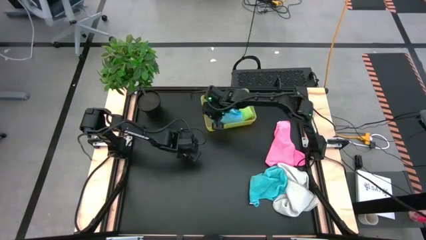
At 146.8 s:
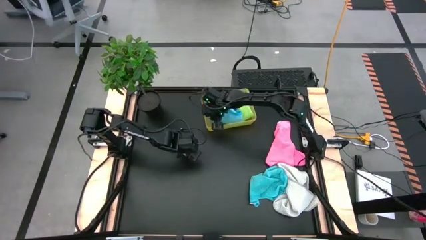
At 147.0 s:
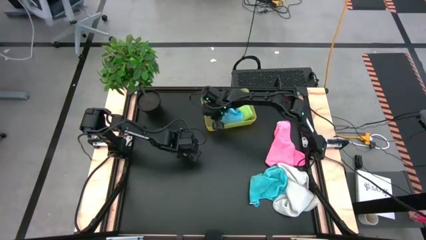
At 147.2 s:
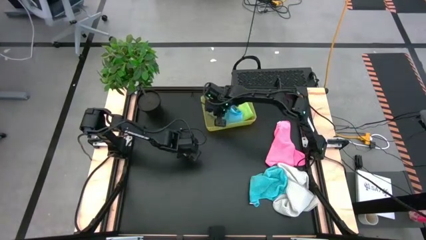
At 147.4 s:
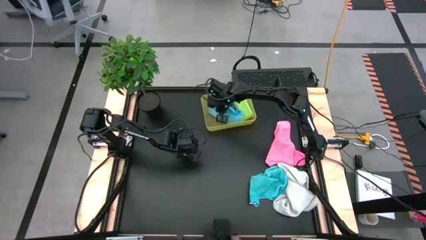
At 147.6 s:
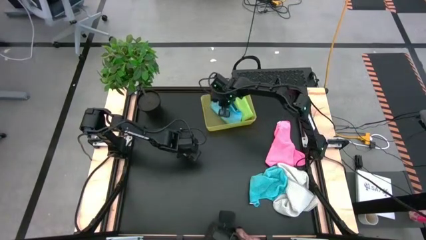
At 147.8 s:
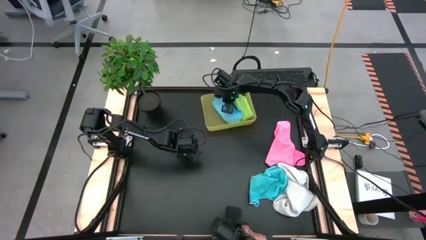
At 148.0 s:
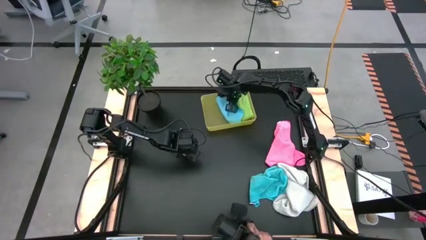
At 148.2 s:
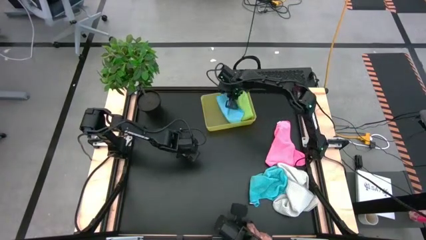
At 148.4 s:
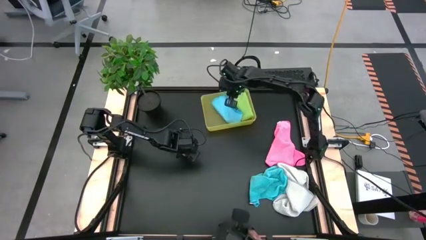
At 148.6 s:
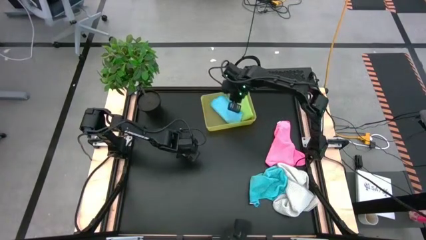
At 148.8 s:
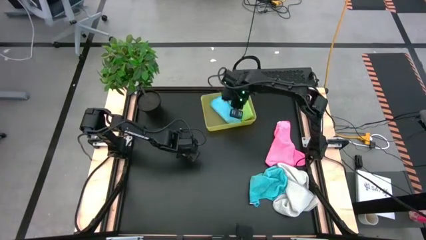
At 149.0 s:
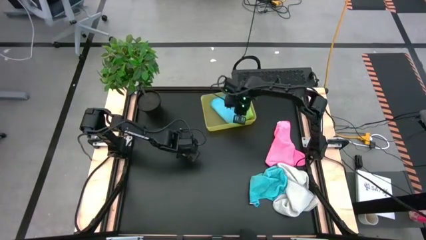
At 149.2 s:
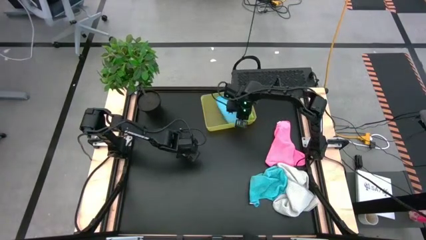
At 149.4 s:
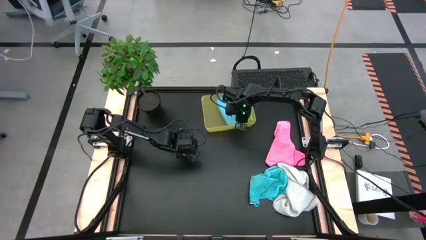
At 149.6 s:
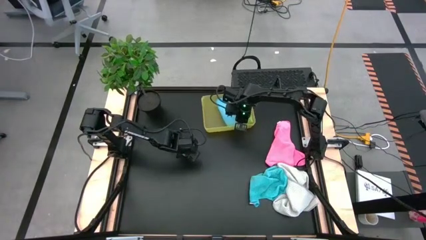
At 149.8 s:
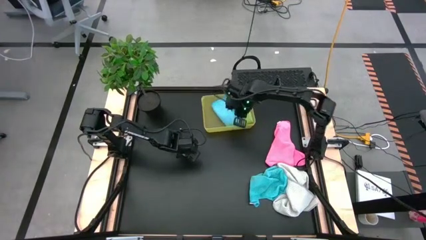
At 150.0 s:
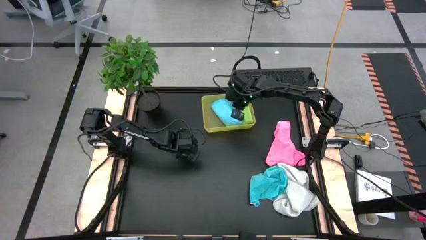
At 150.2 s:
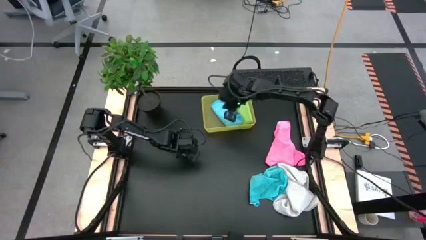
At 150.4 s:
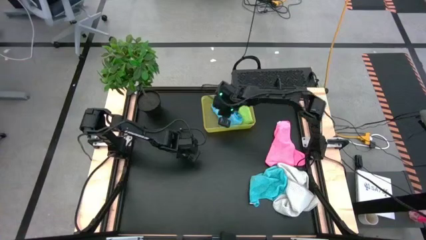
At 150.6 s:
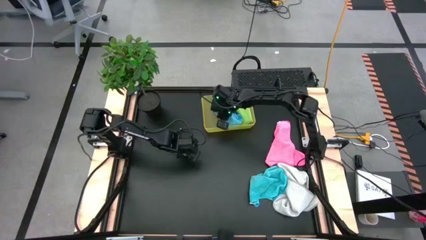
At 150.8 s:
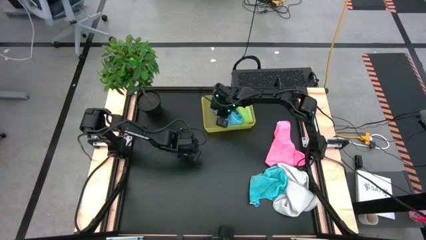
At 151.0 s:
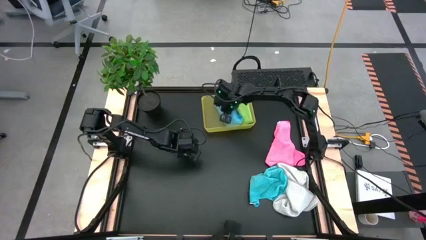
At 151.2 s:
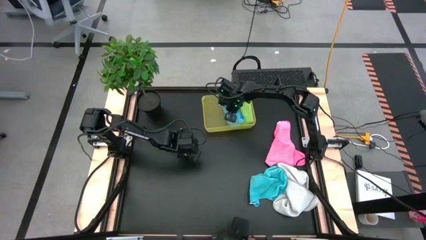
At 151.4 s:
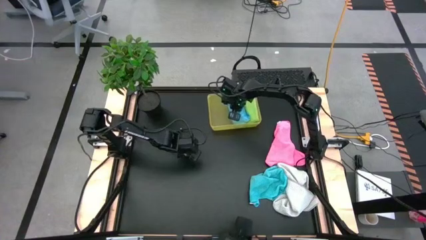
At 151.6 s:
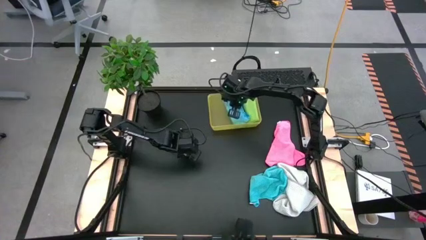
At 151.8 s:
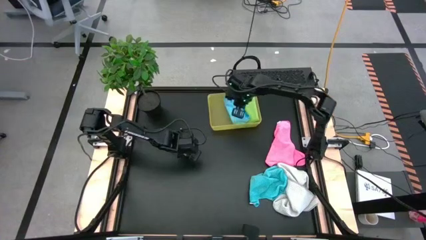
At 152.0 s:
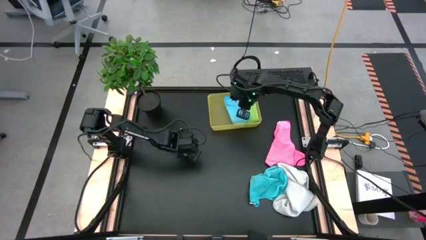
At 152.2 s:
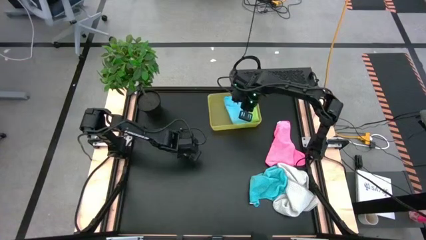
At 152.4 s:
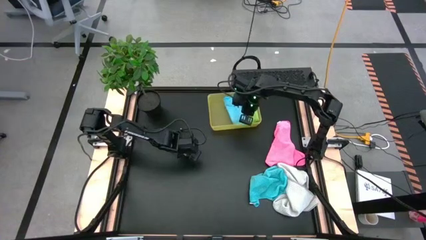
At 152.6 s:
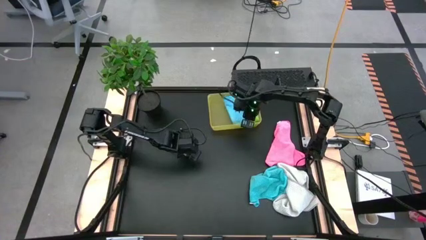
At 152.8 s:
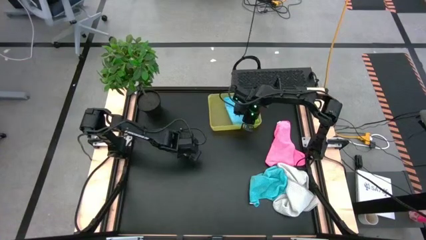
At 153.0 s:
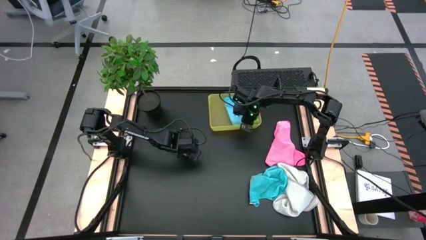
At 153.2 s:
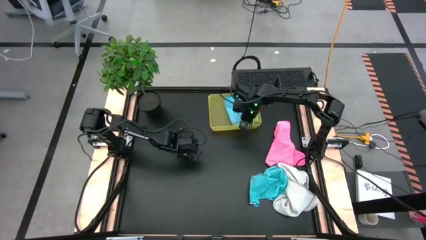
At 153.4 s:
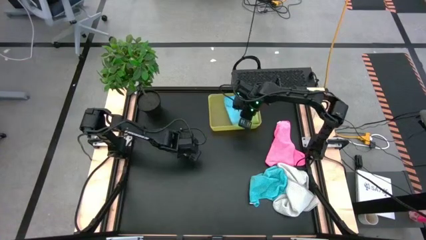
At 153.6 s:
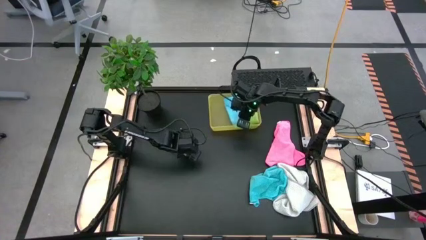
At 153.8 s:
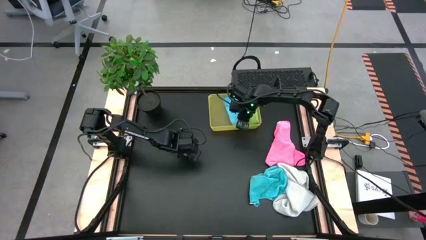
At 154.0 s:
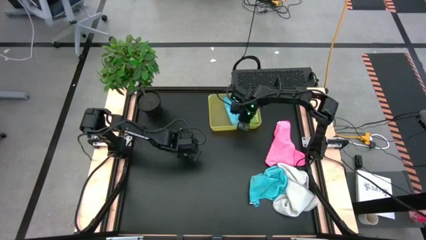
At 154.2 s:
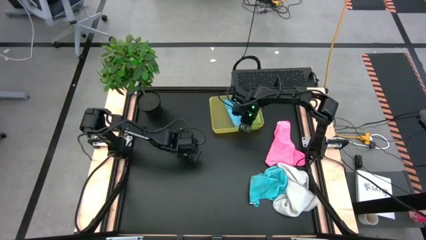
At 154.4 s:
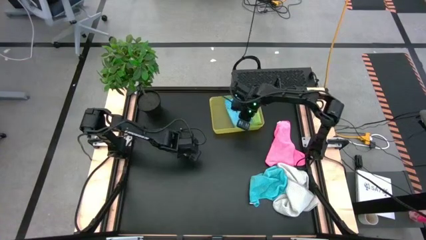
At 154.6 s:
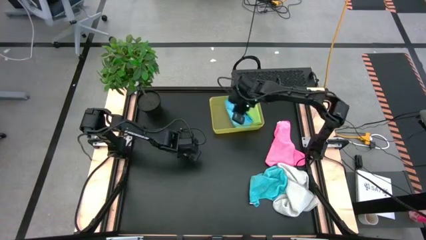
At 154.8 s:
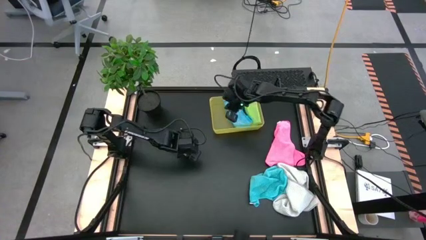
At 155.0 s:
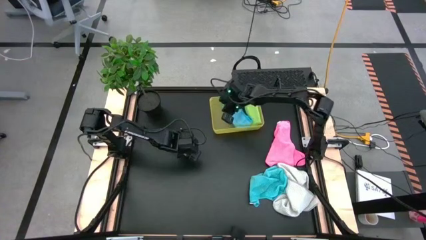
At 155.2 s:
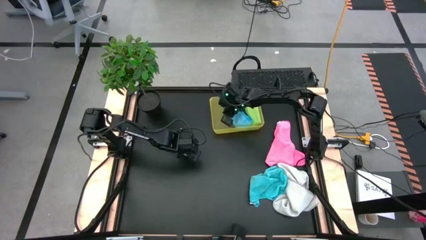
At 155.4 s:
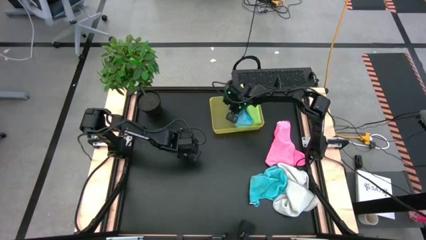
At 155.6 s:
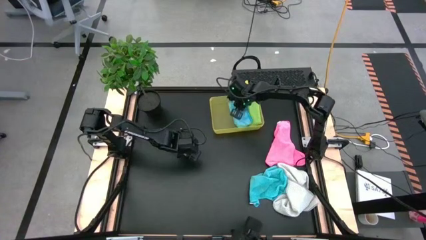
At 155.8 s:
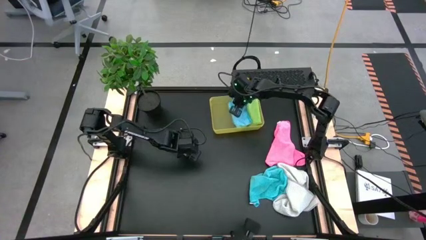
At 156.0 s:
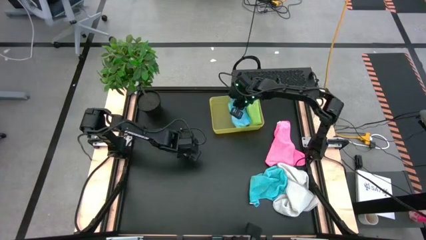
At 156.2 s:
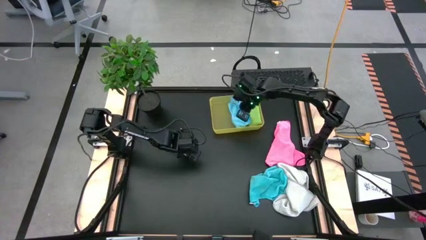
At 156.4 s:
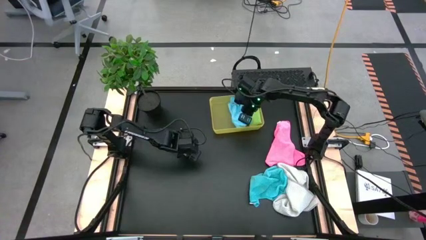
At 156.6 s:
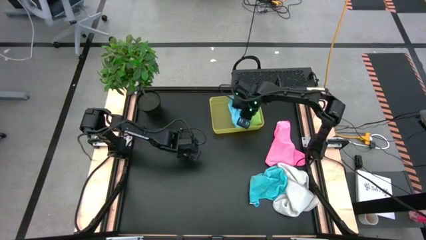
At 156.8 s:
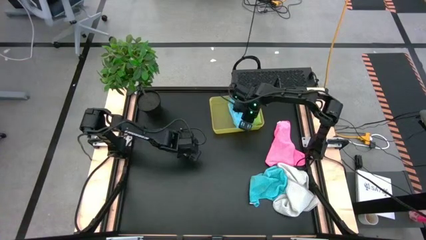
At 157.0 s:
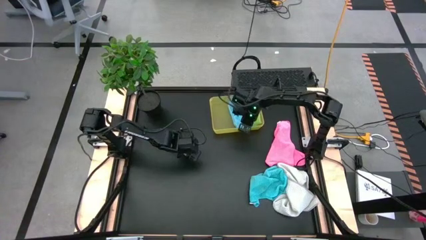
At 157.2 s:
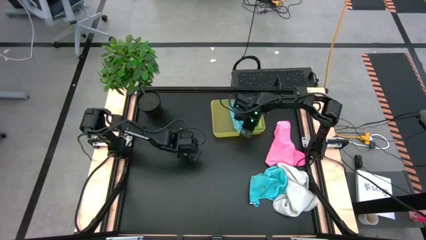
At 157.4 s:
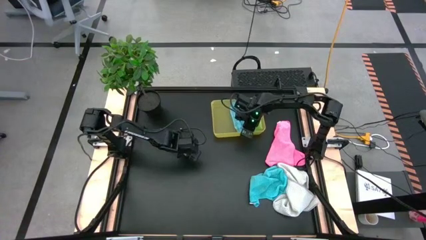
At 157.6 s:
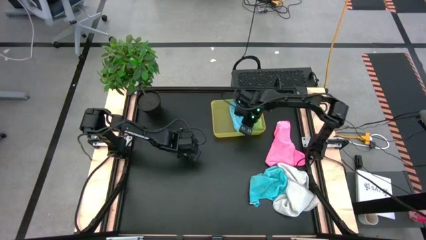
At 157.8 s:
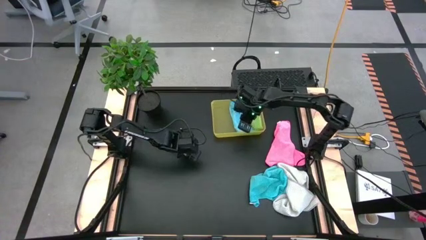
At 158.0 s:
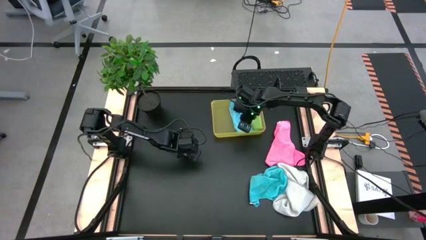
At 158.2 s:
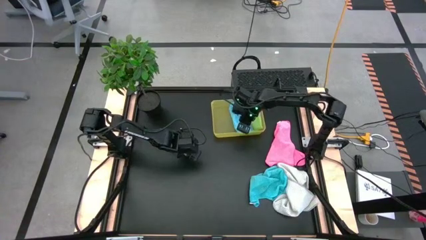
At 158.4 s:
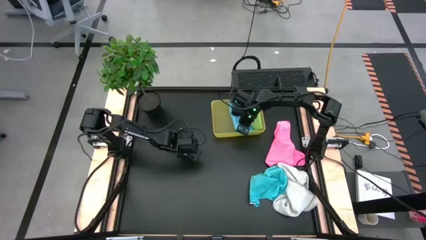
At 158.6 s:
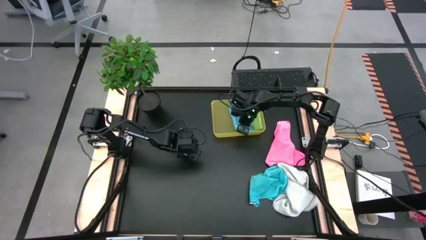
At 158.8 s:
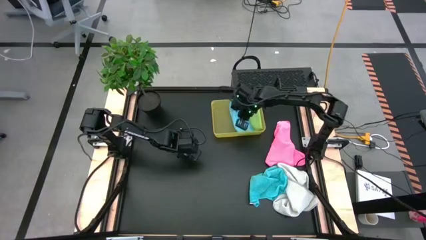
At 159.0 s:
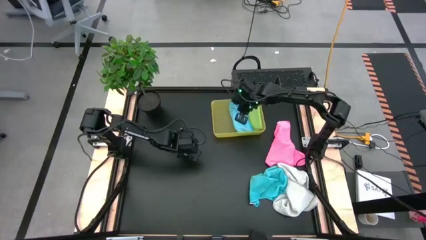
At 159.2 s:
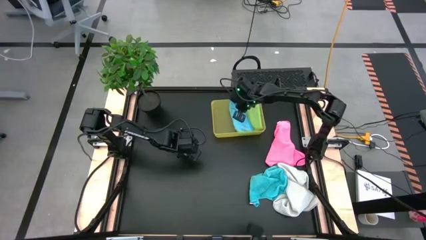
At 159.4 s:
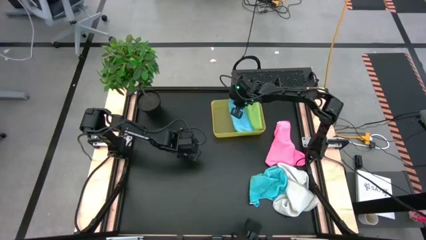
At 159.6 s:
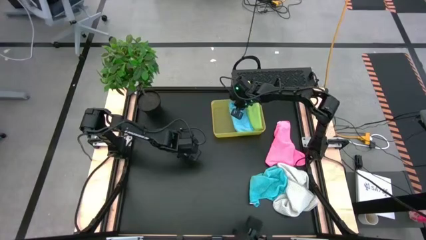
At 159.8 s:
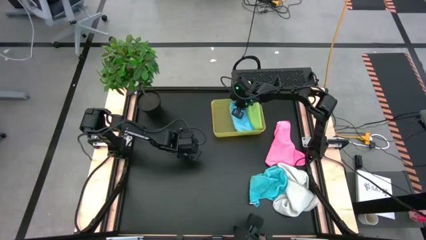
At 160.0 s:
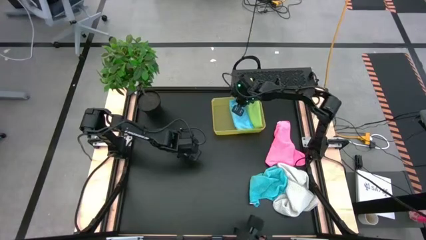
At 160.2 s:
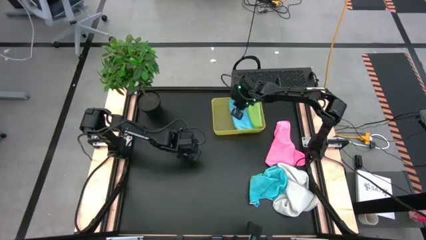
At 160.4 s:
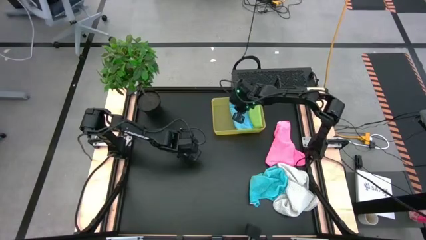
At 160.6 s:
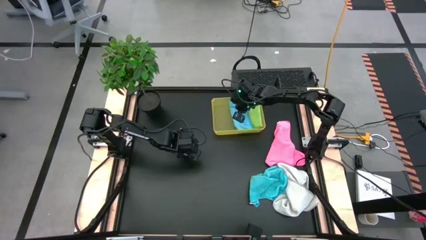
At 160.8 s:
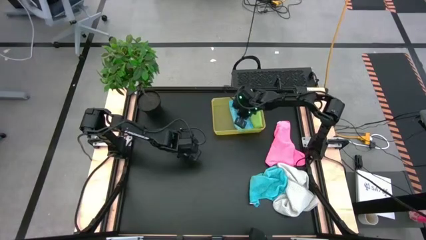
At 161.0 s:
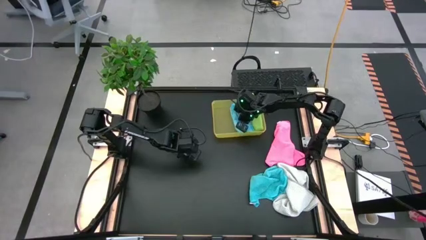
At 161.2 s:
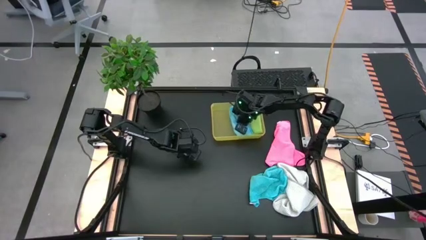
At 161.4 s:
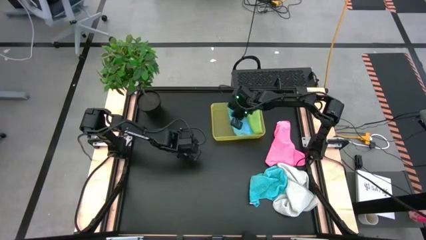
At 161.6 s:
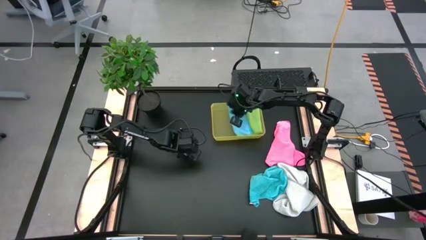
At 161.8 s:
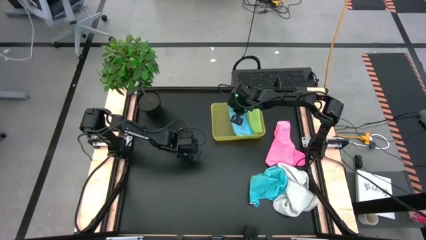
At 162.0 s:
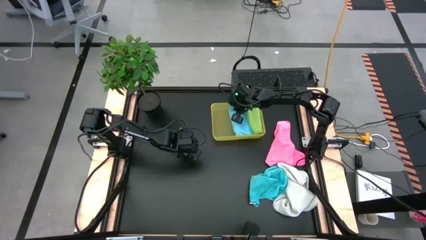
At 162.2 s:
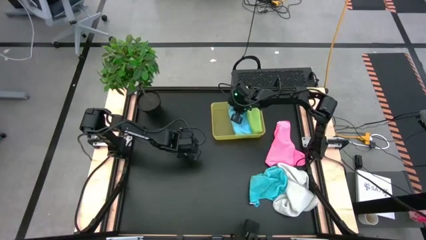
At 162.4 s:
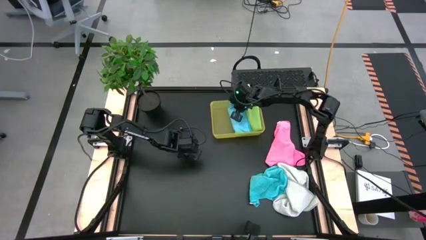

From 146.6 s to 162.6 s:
Task: Fold microfiber towels
Put the left blue microfiber cloth into the bin
